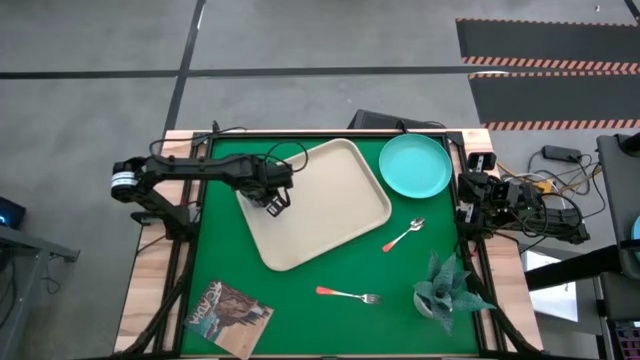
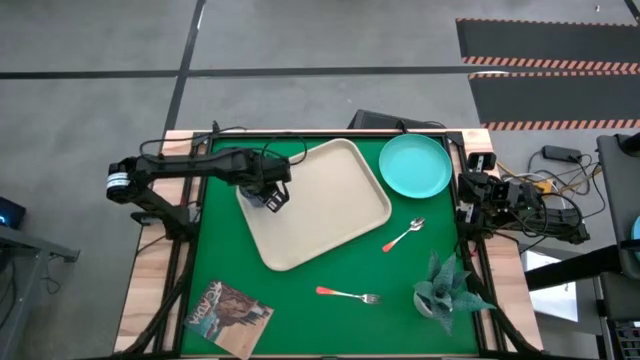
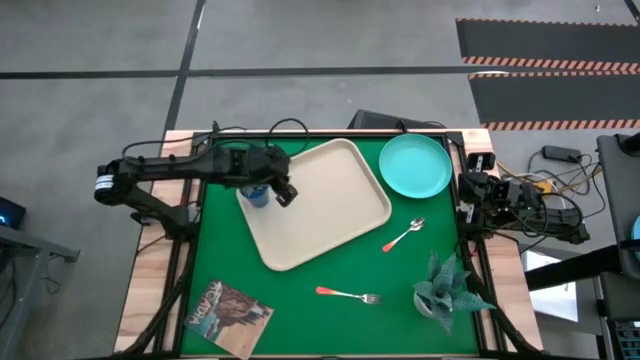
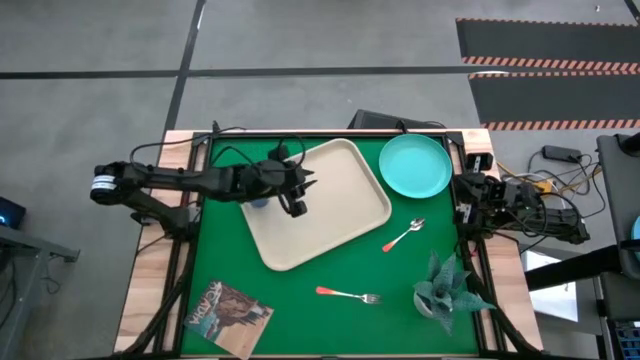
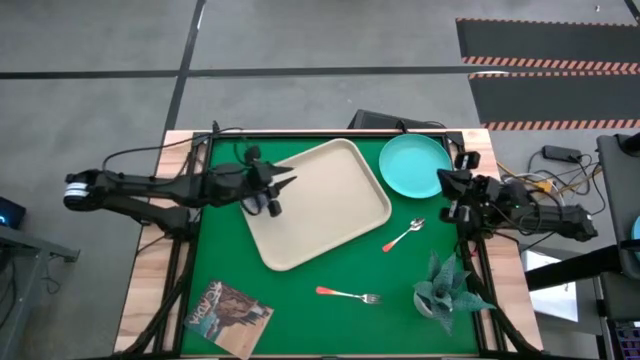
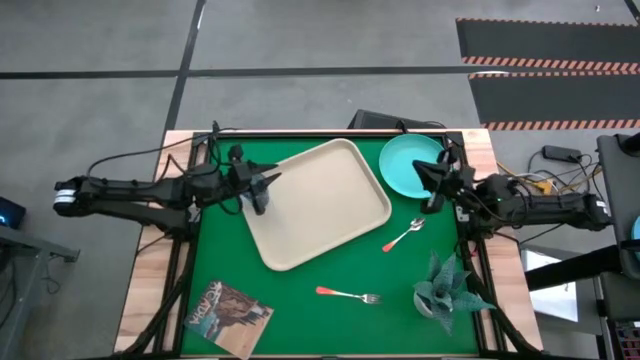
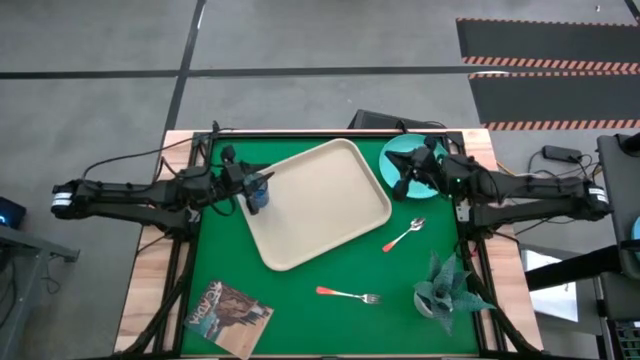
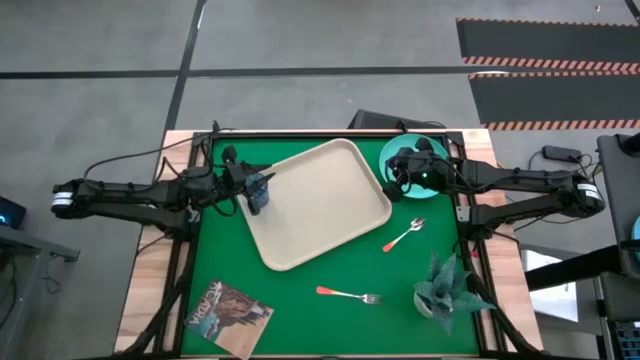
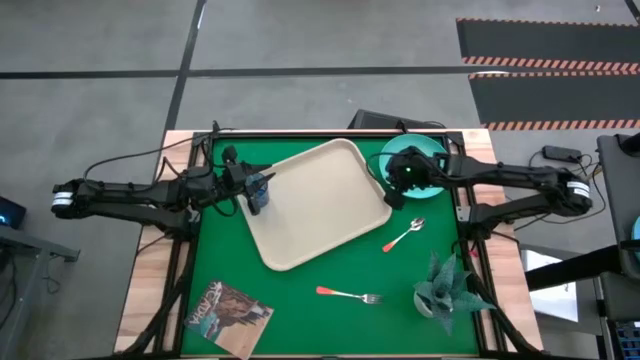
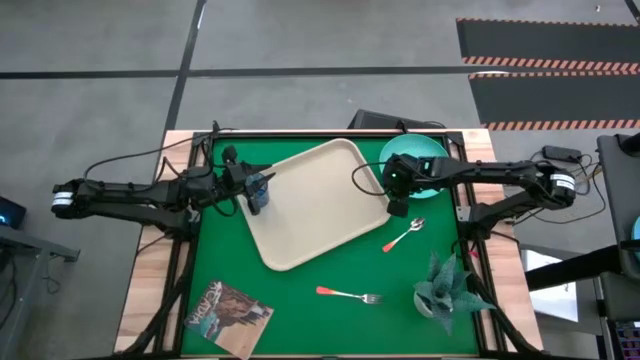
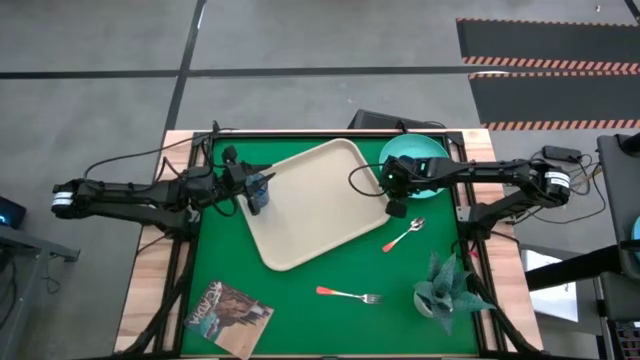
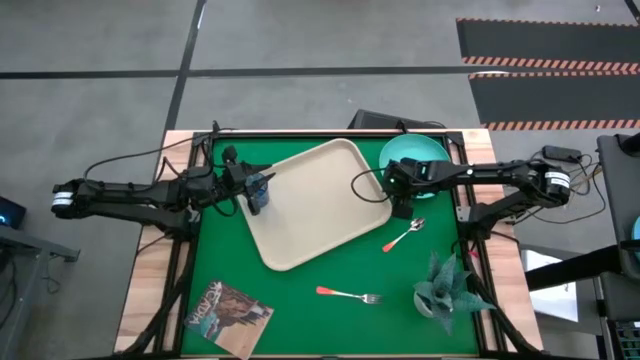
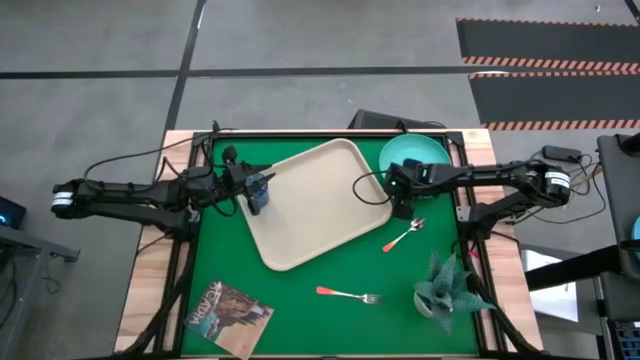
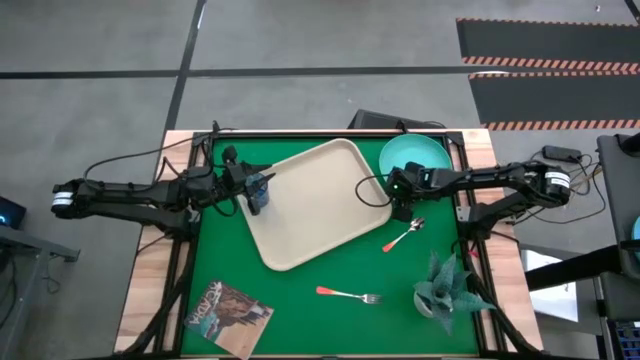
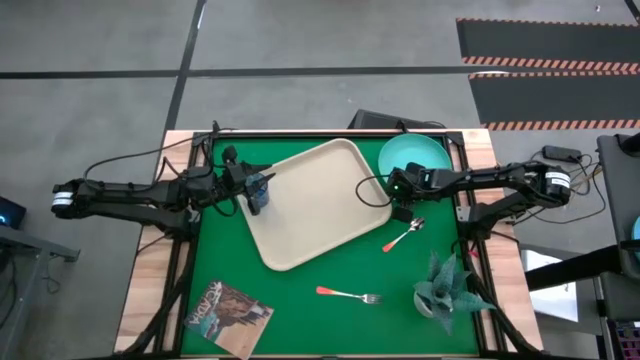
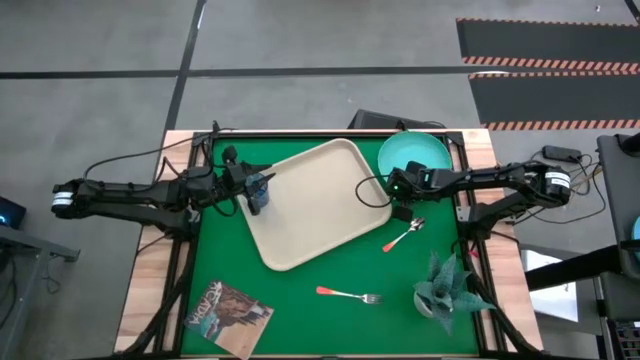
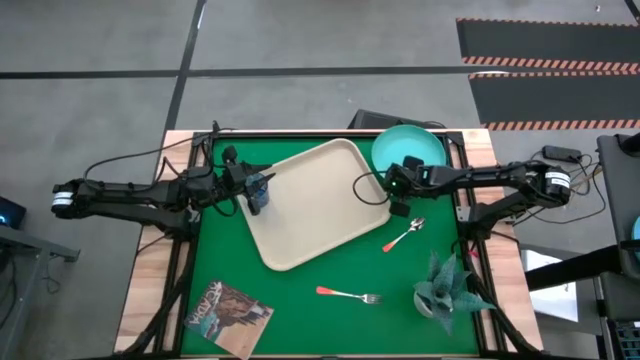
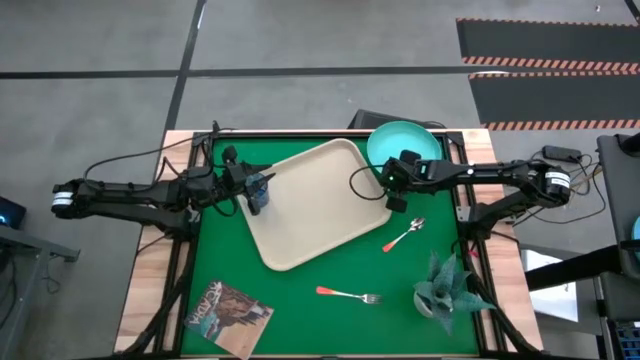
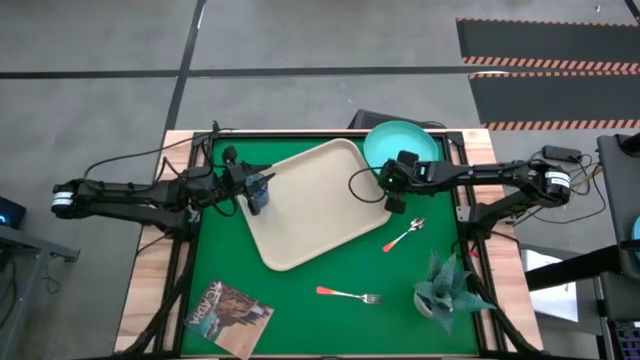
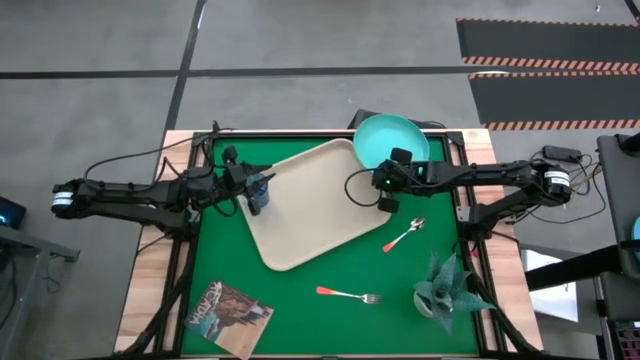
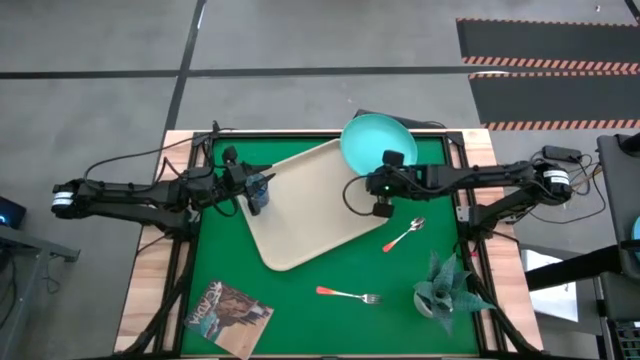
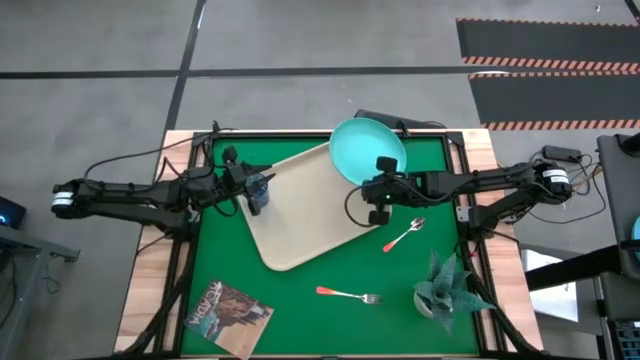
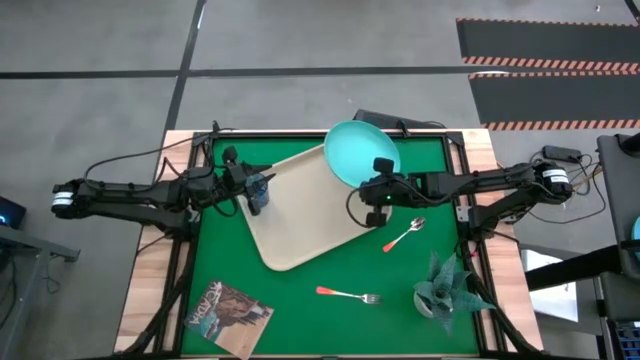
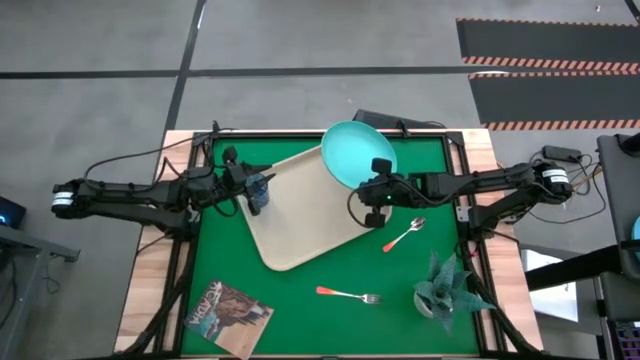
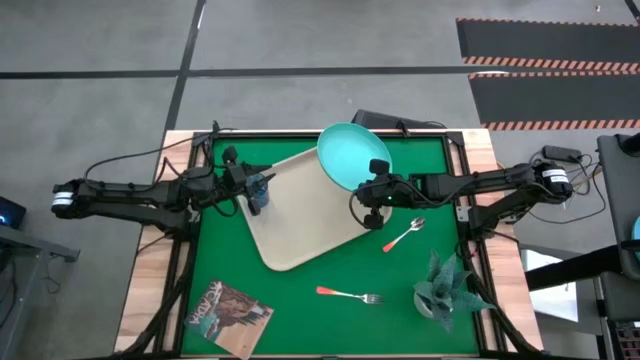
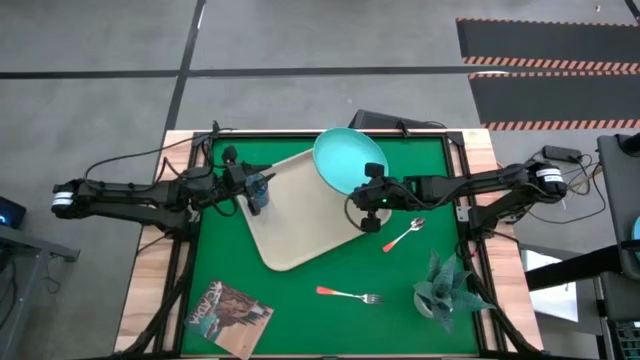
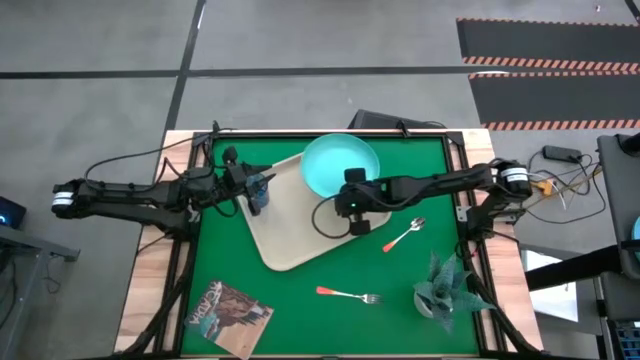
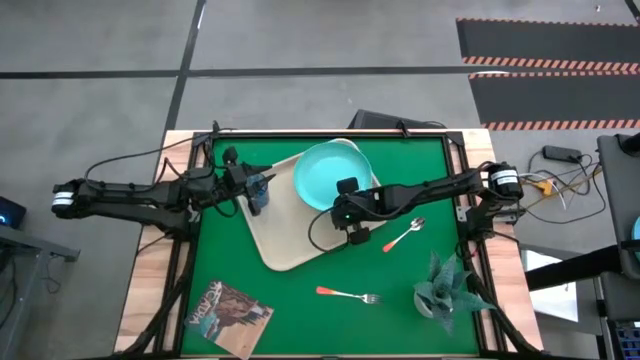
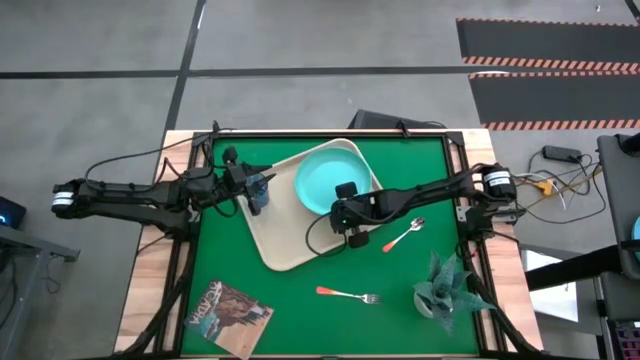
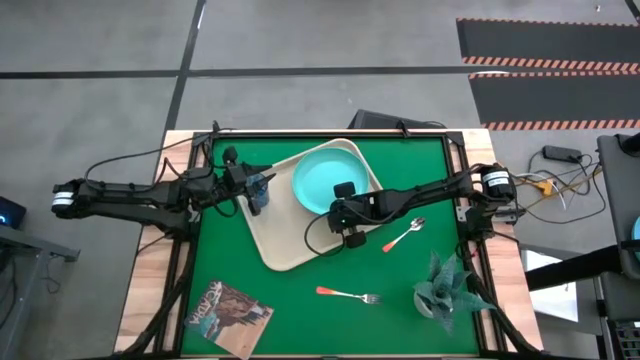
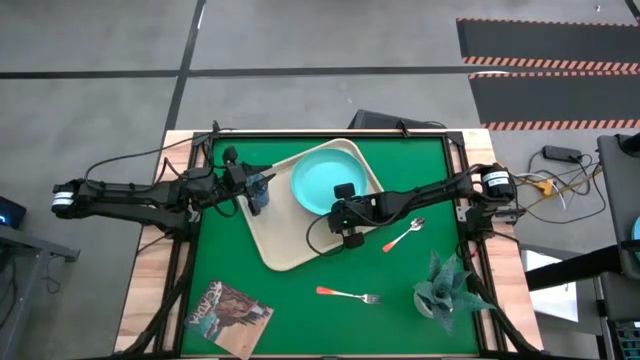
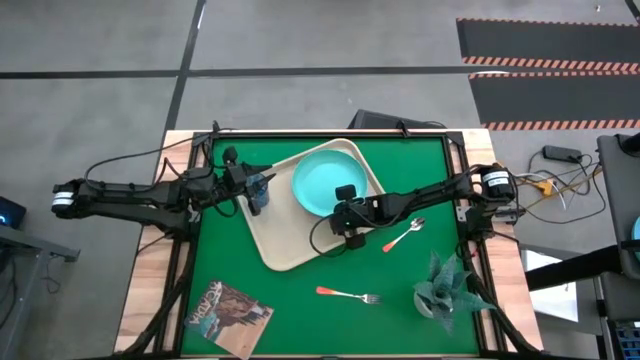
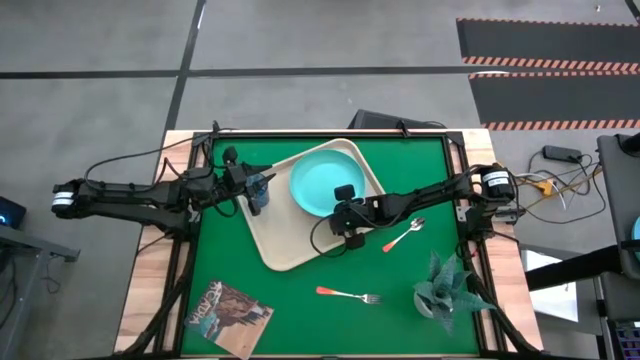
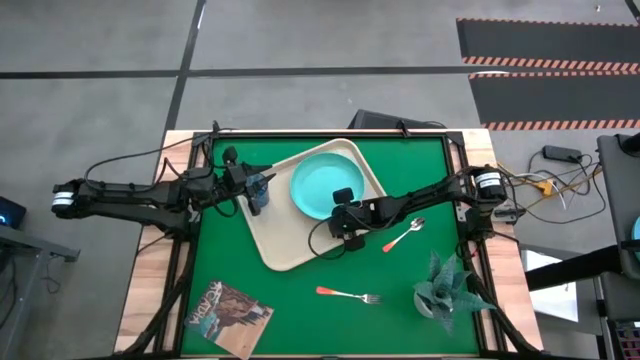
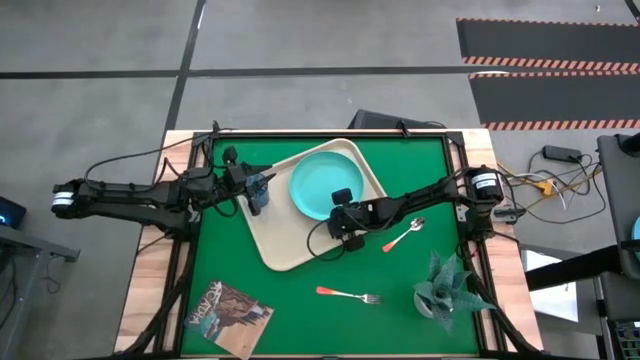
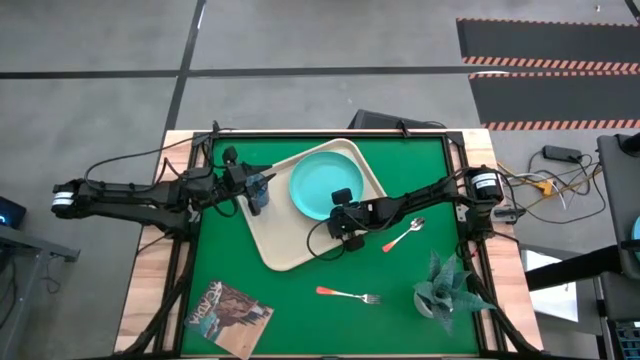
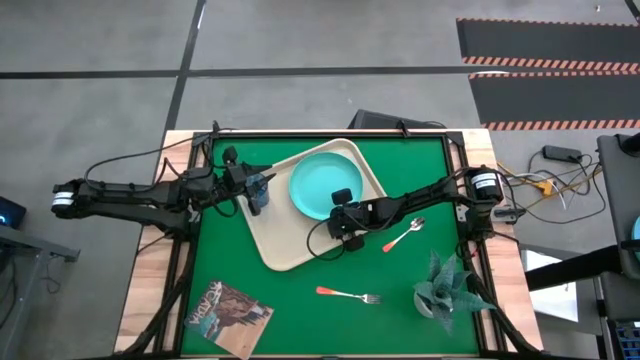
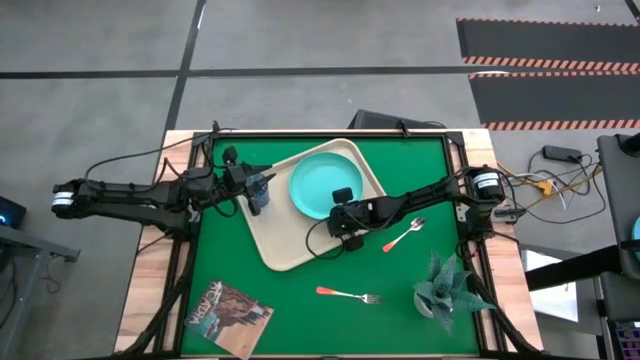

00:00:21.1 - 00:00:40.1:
Task: Pick and place plate/cup/fork/spoon on tray
Put the blue plate on the white tray
